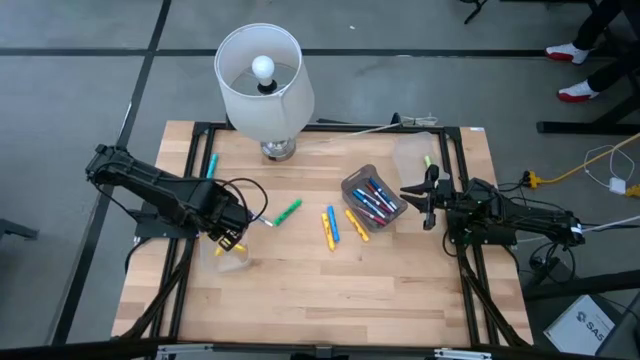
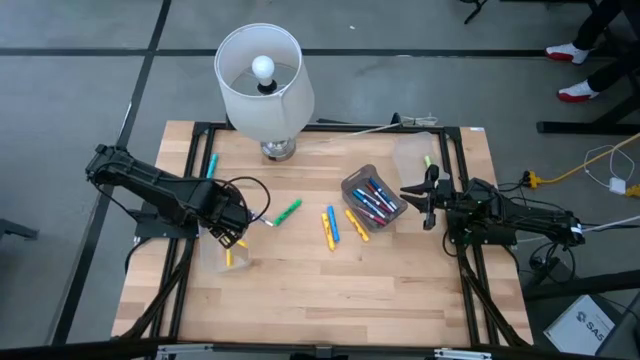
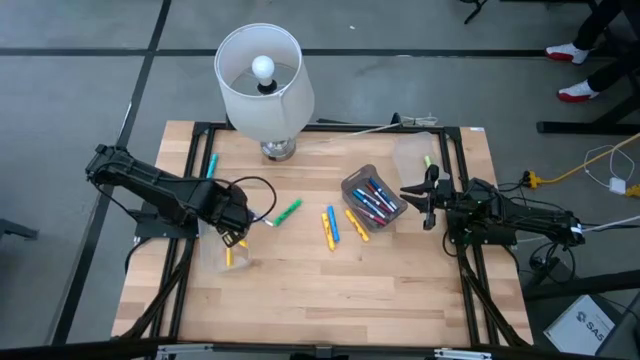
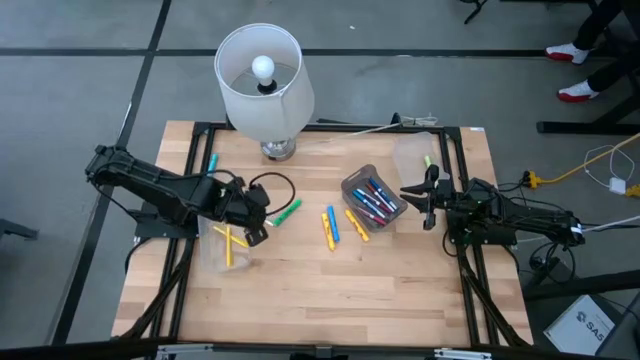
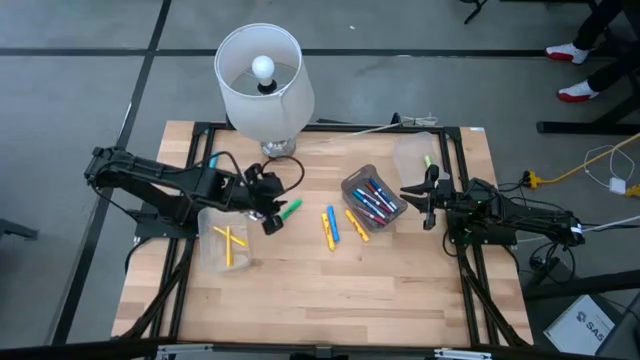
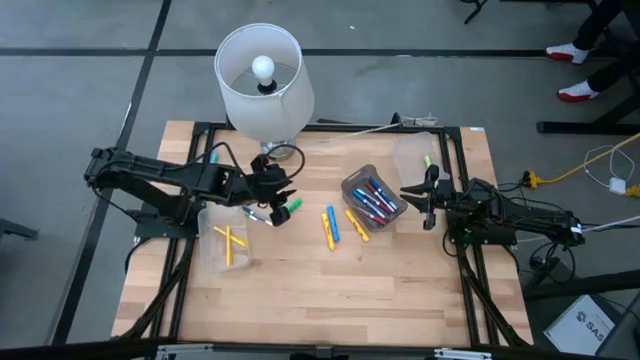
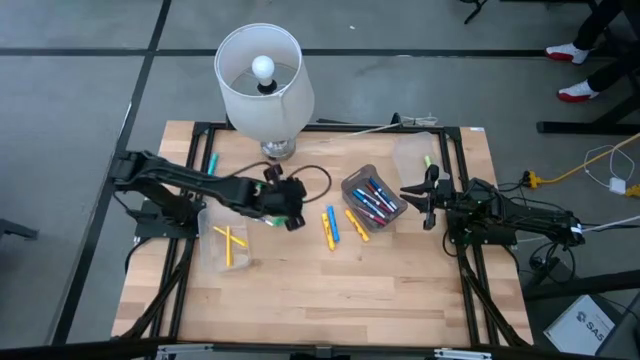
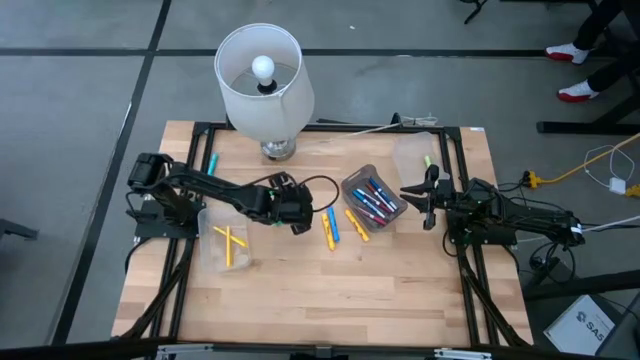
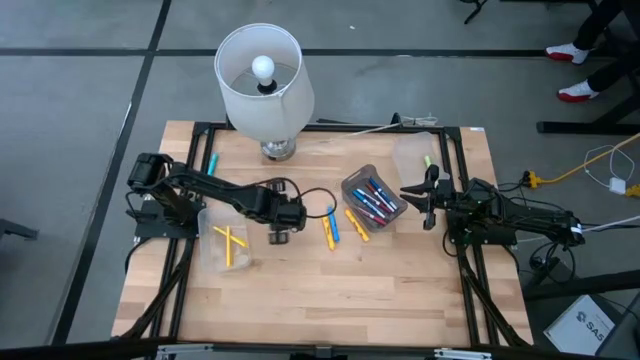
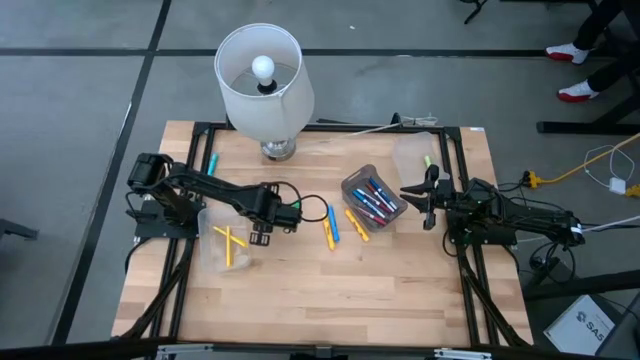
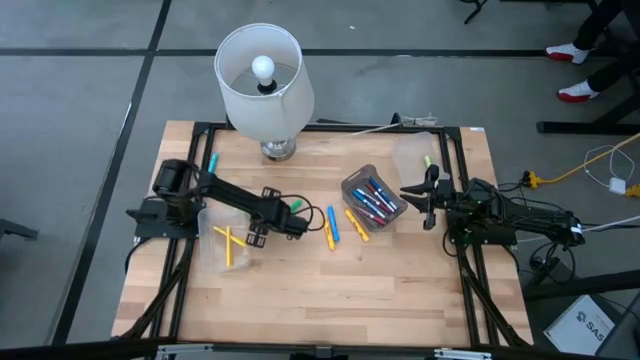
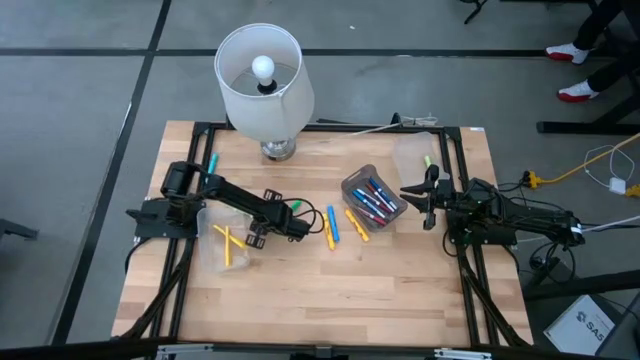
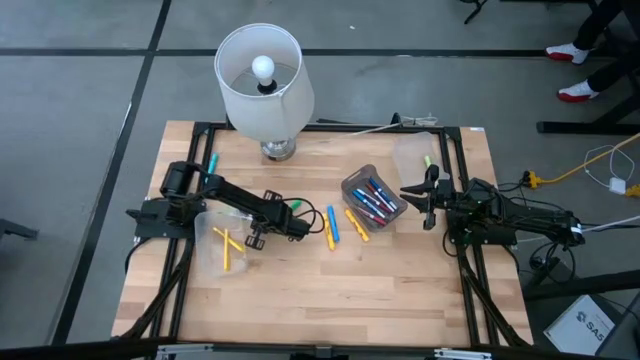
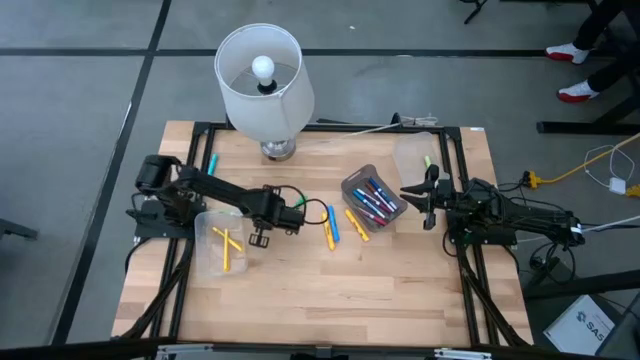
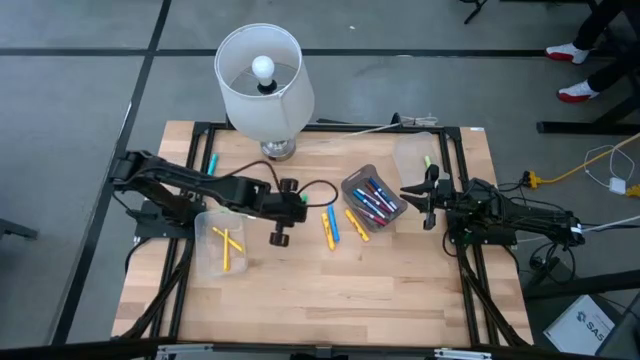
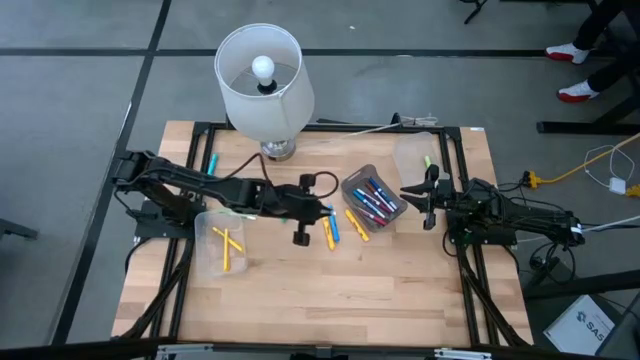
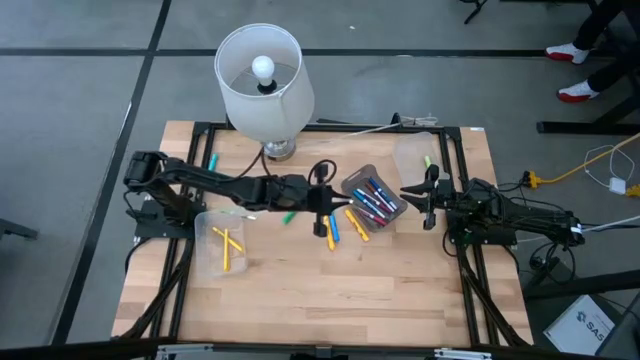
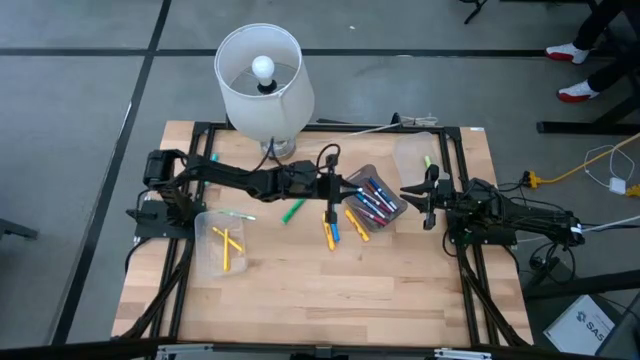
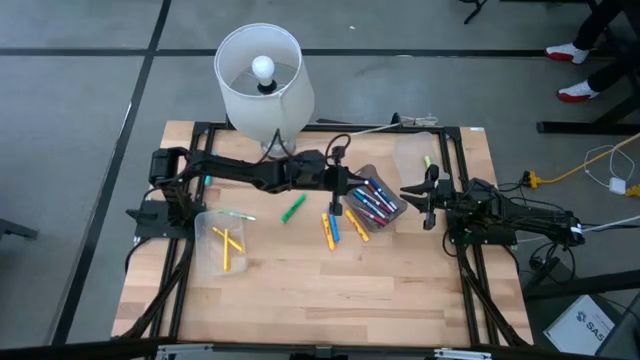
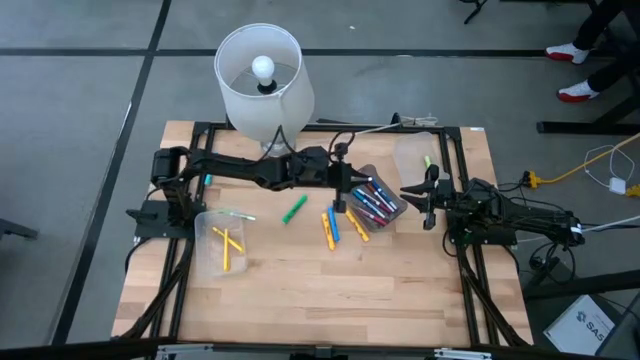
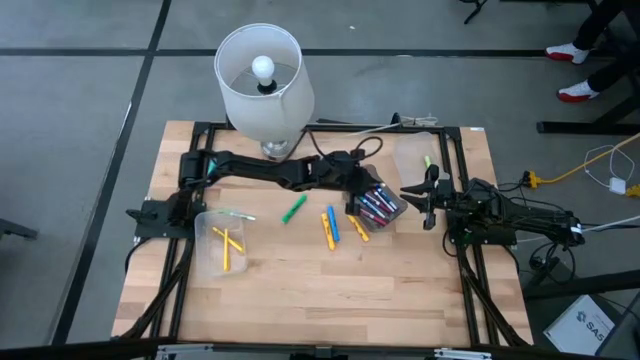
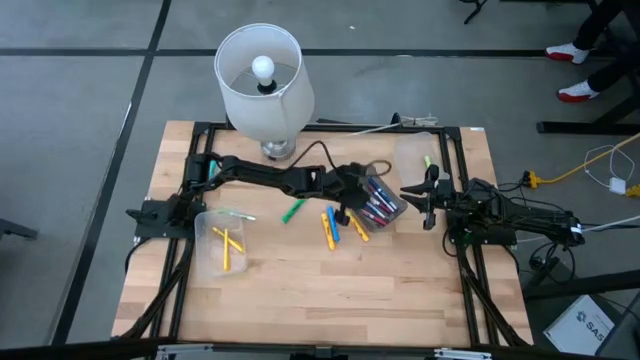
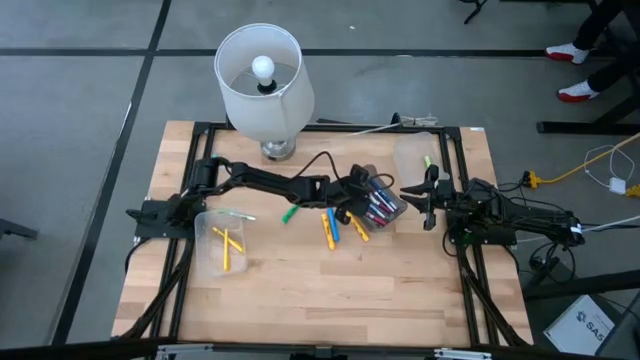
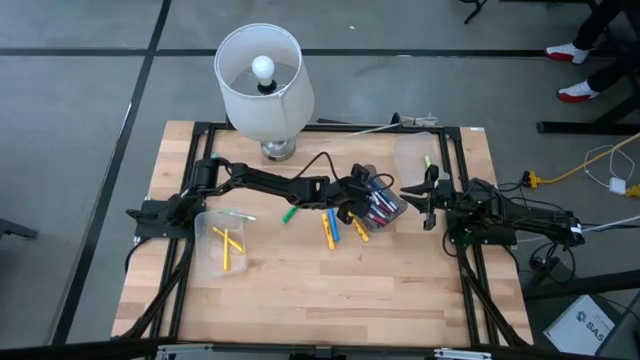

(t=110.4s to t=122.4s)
Task: Pick & Place Markers
Put the blue marker pen into the black bin

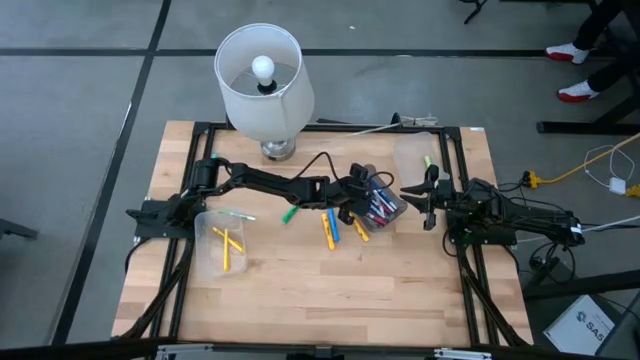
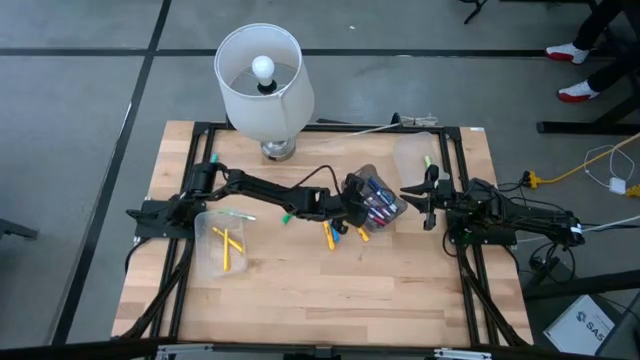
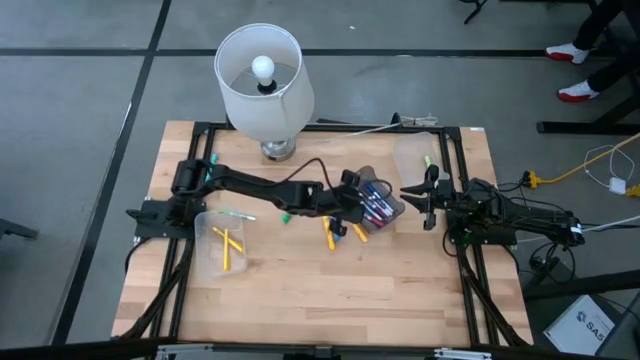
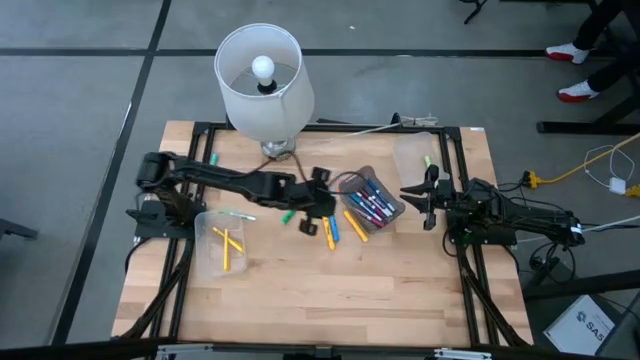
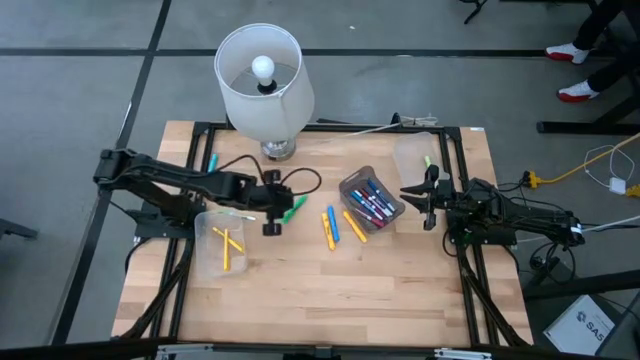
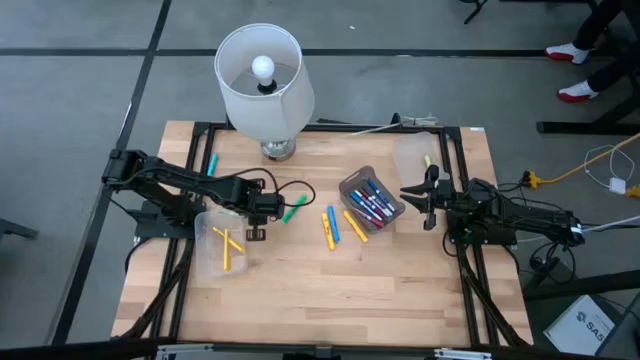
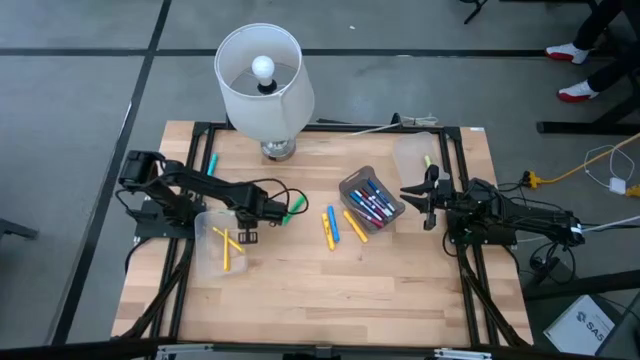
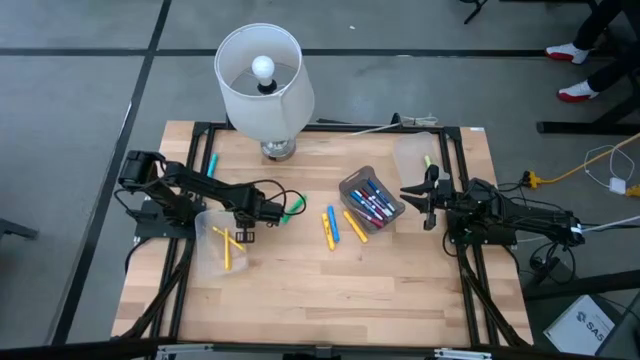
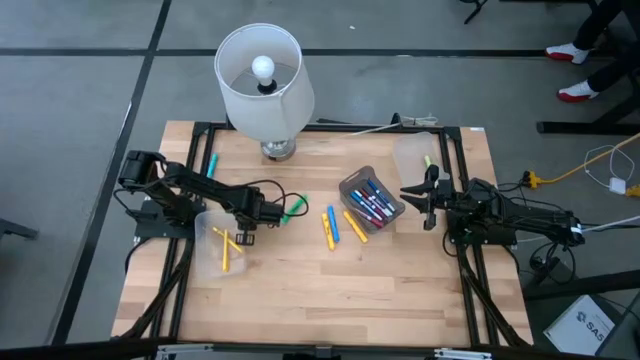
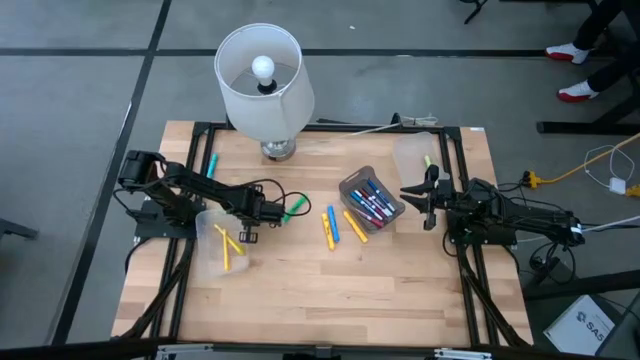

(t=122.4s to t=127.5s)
Put the light green marker pen into the black bin

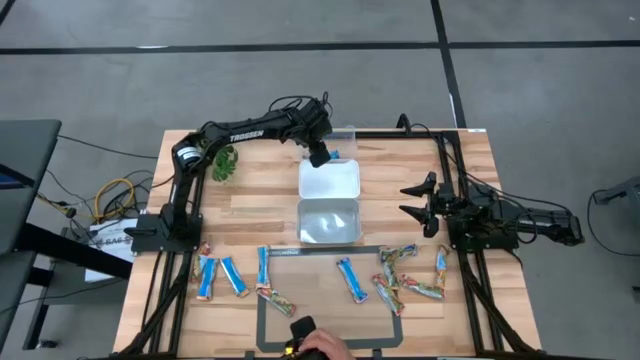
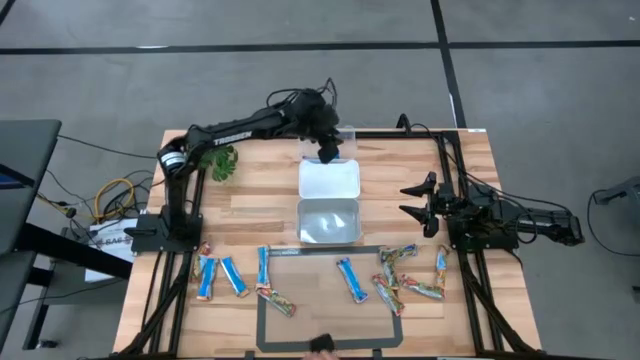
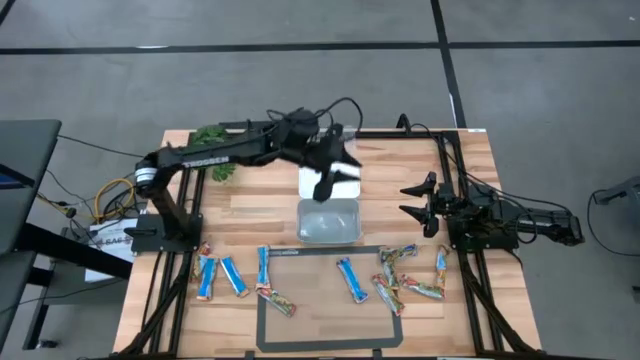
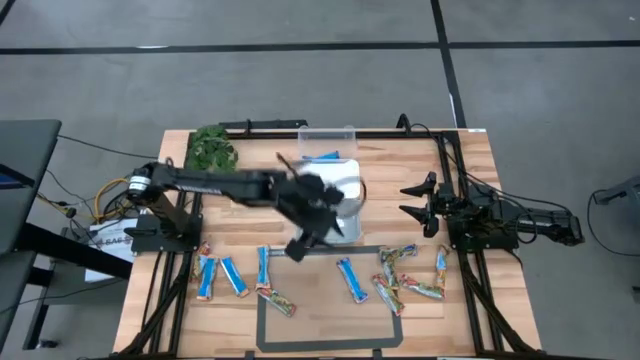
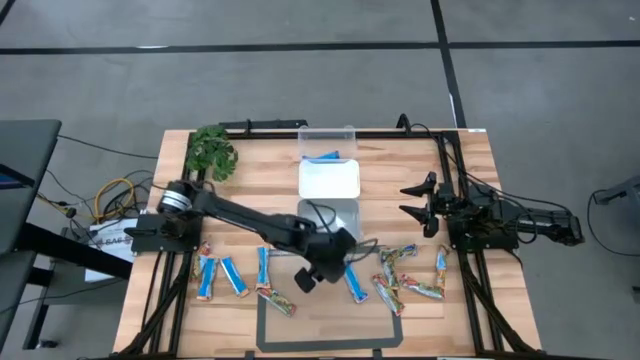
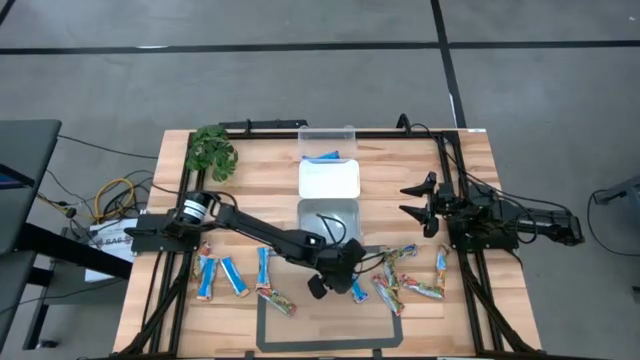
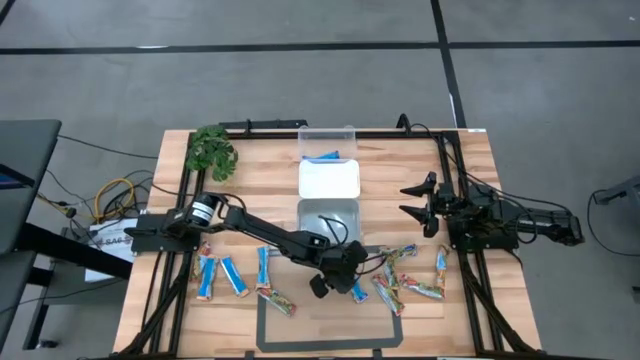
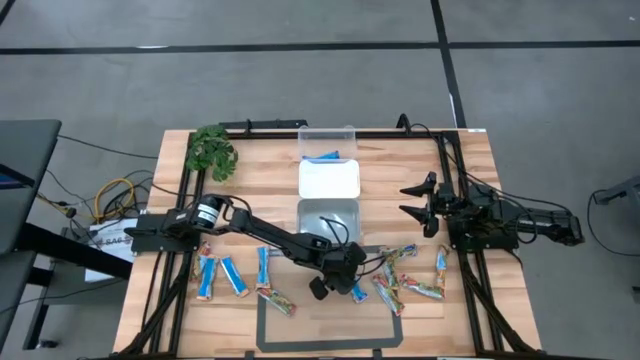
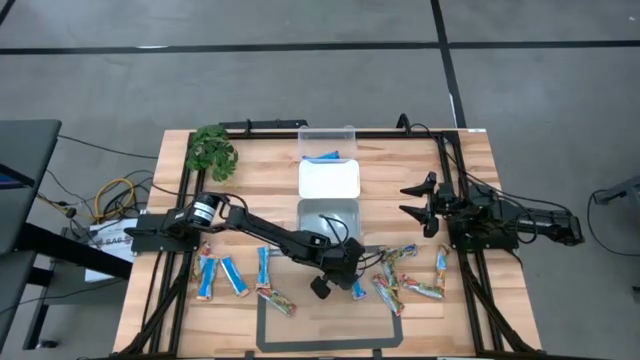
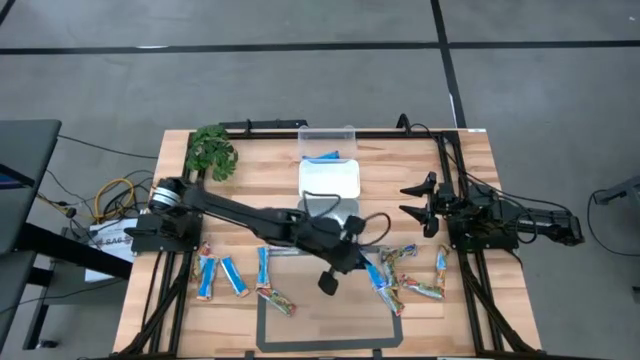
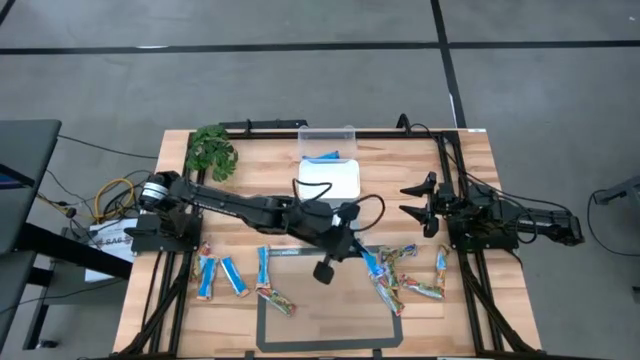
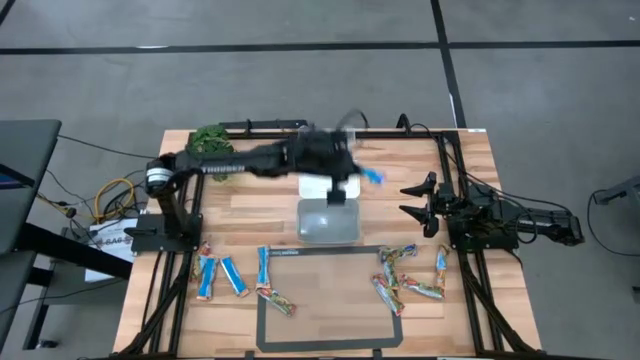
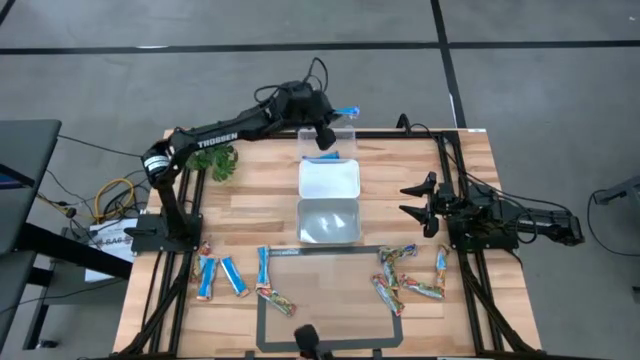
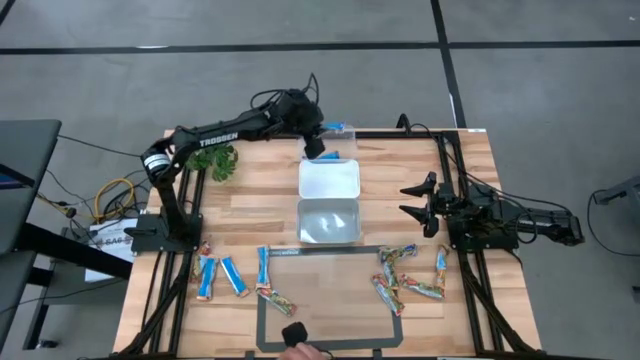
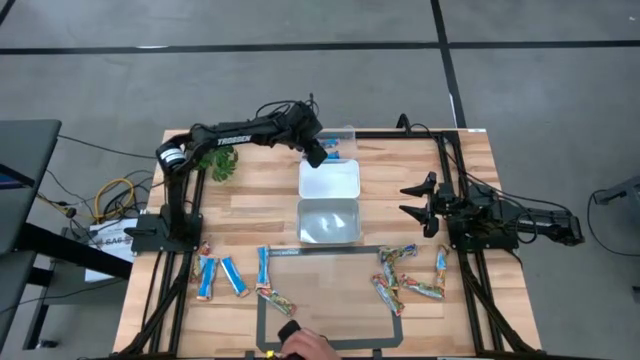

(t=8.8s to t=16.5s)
Task: Pick and place Granola Bars by type
Put the blue granola bar into the transparent bin
